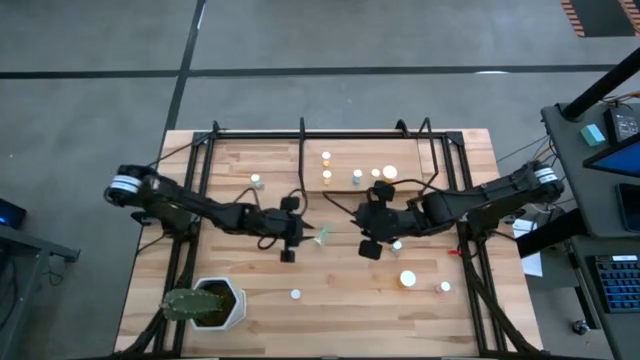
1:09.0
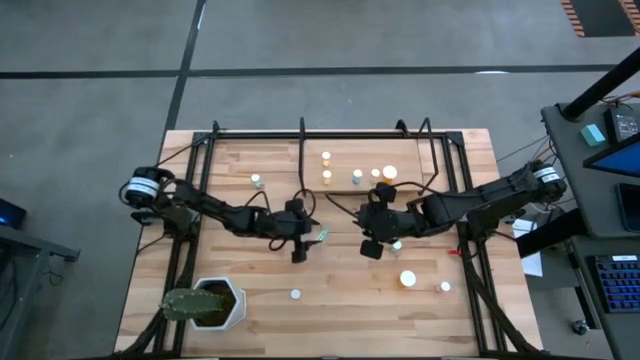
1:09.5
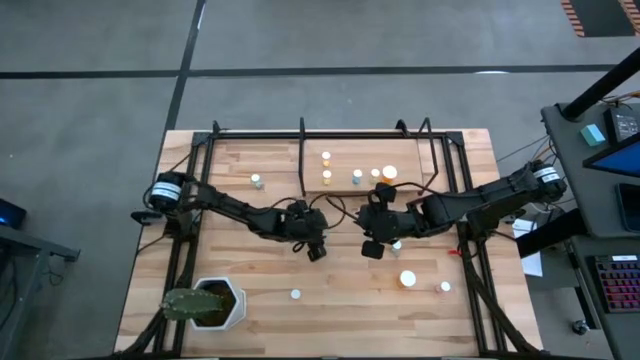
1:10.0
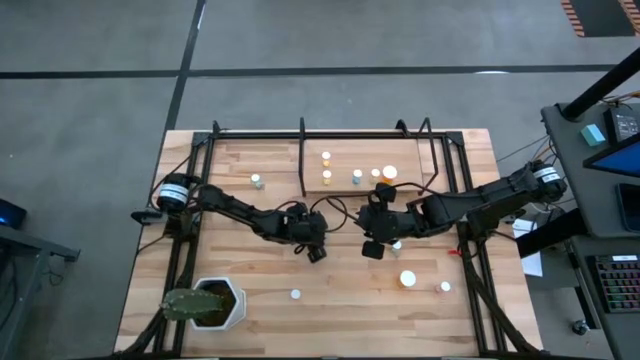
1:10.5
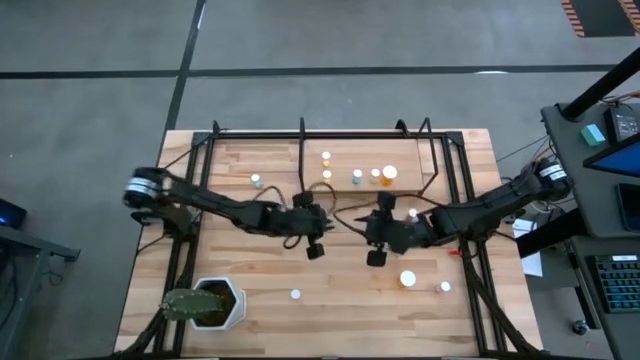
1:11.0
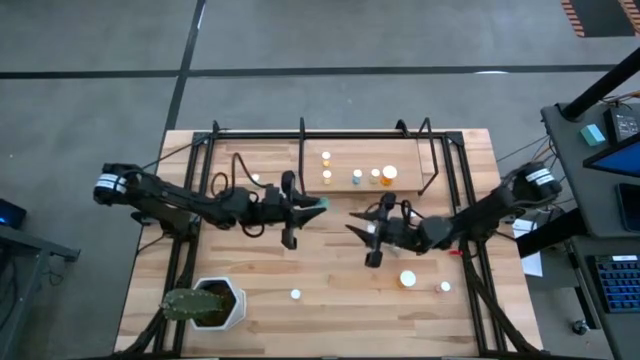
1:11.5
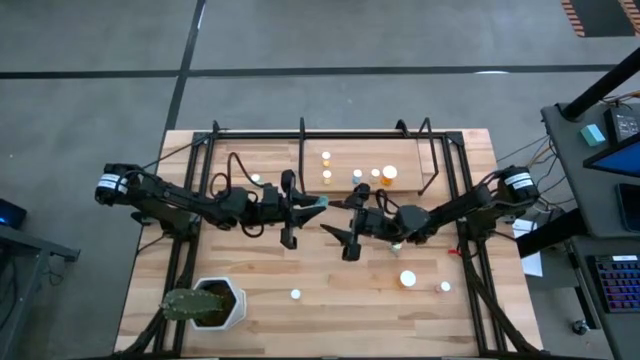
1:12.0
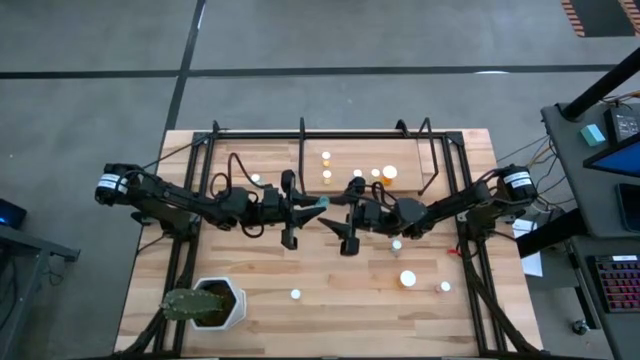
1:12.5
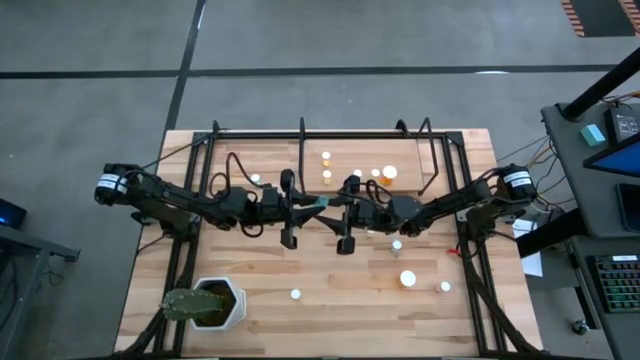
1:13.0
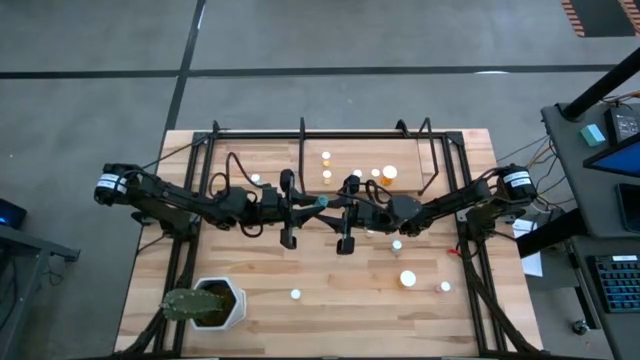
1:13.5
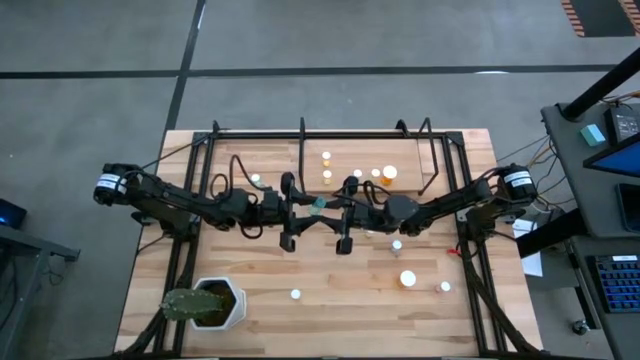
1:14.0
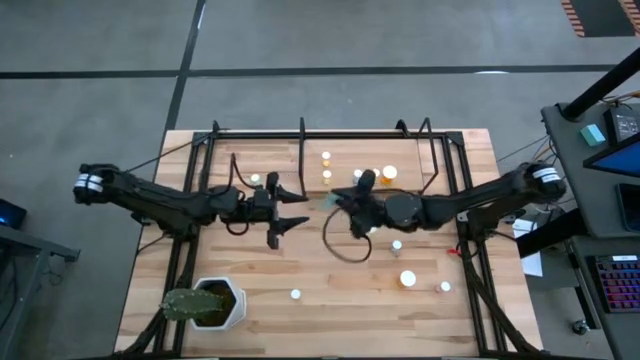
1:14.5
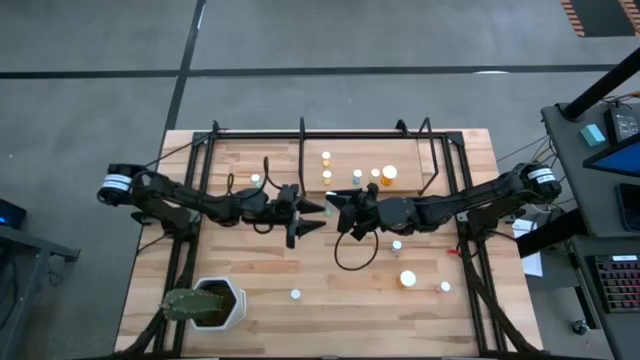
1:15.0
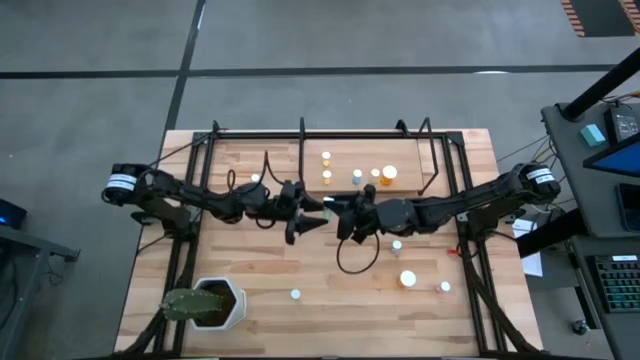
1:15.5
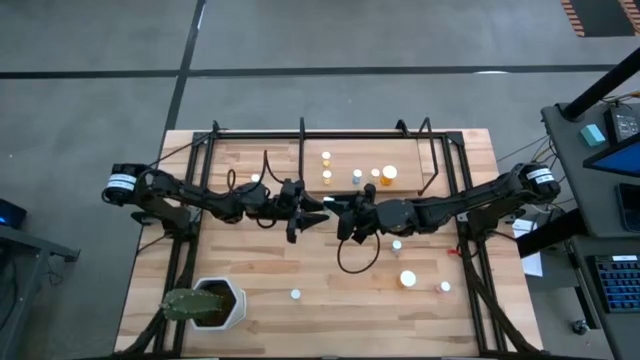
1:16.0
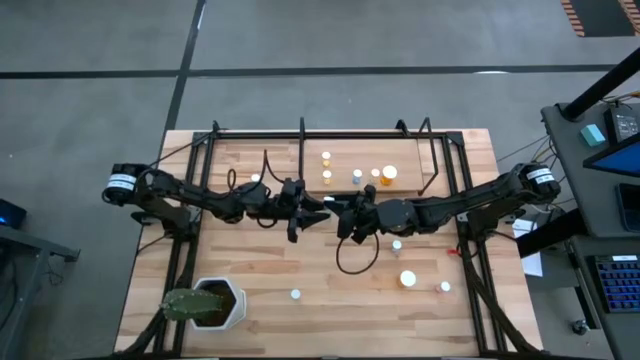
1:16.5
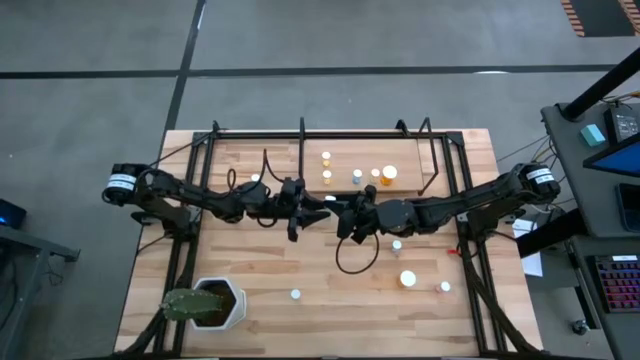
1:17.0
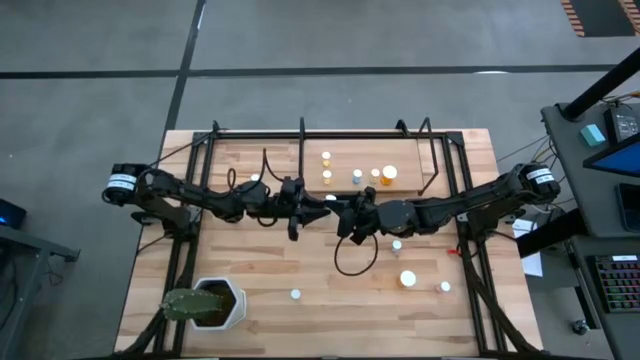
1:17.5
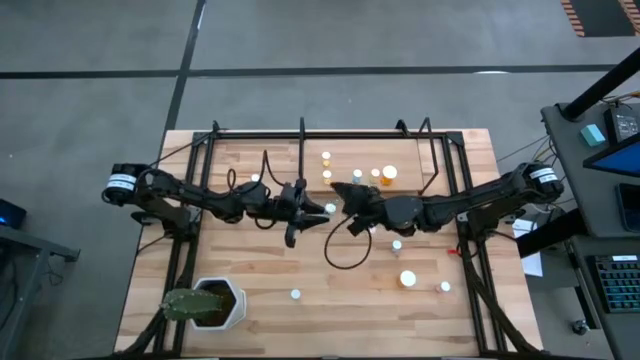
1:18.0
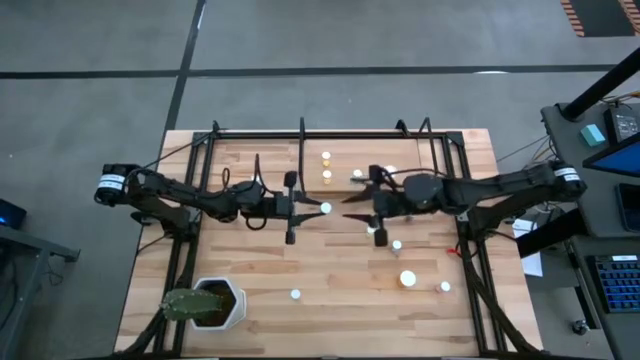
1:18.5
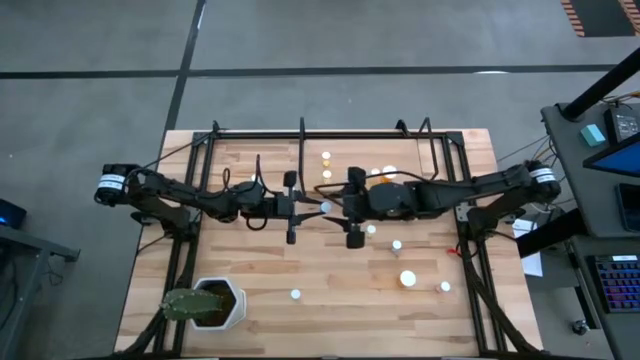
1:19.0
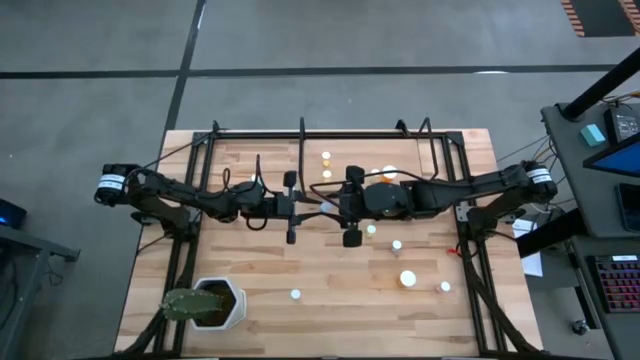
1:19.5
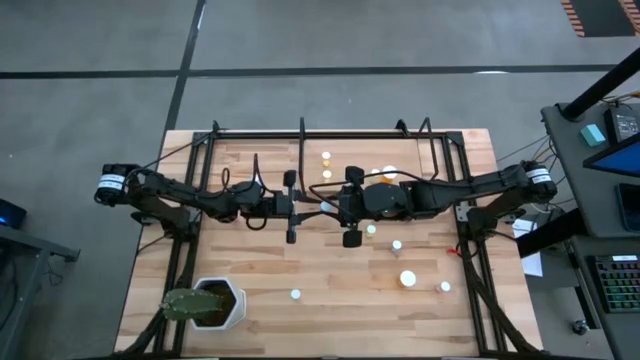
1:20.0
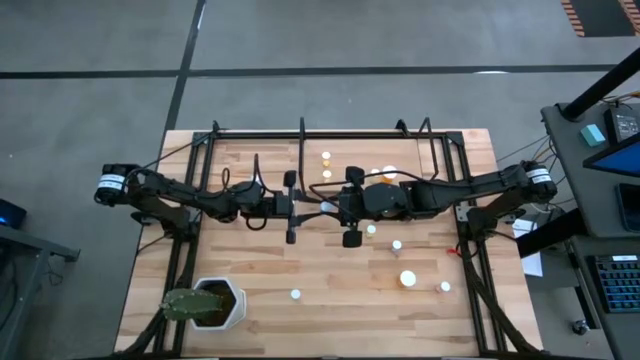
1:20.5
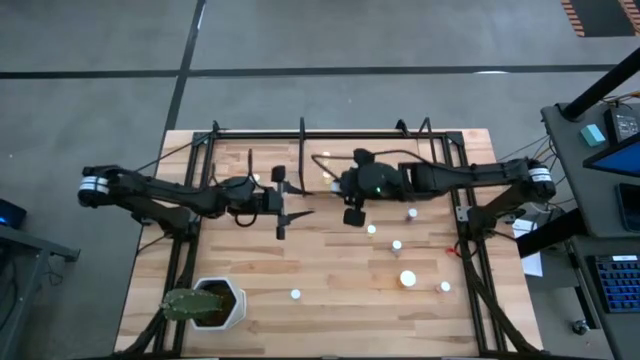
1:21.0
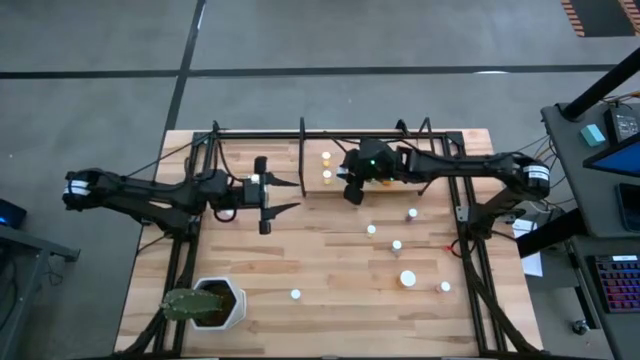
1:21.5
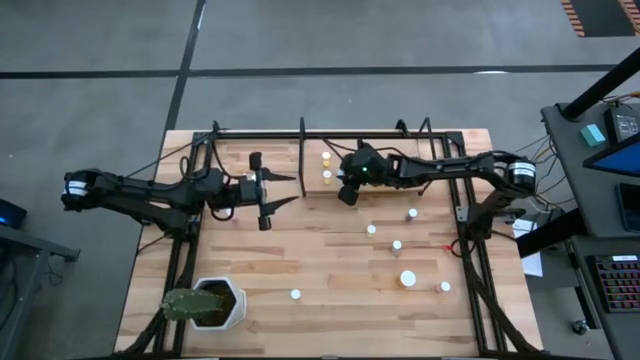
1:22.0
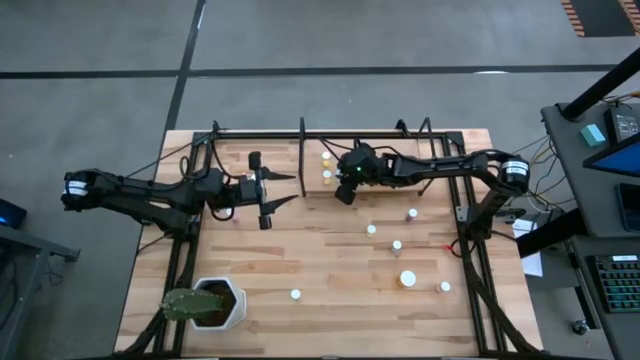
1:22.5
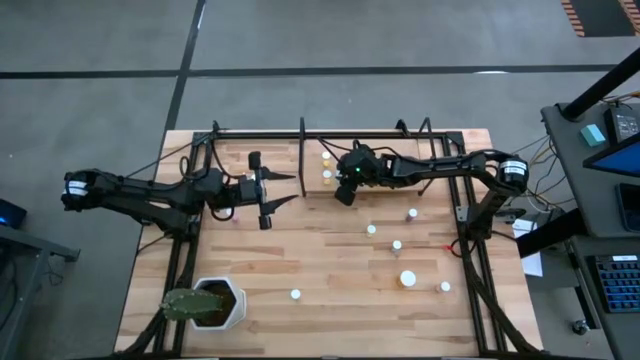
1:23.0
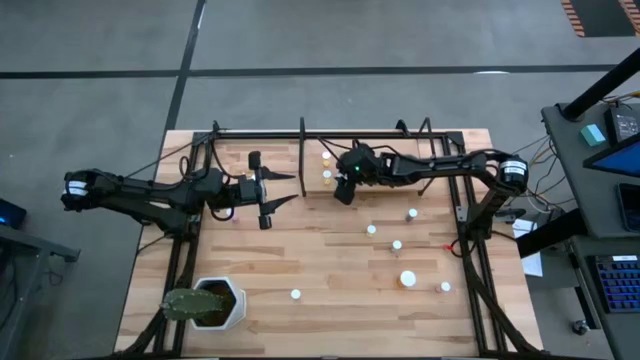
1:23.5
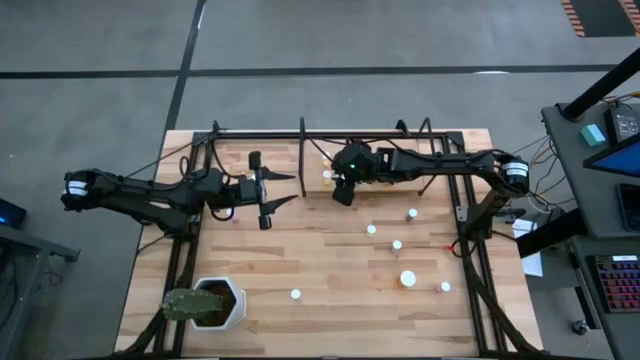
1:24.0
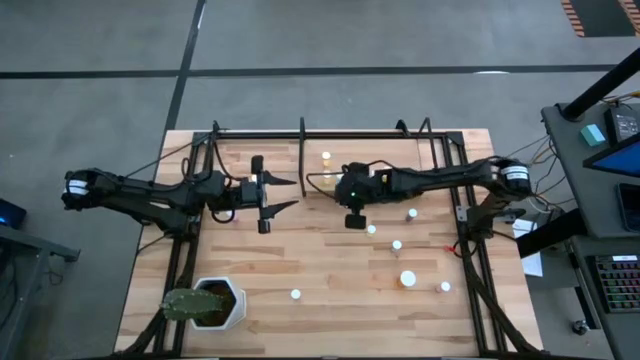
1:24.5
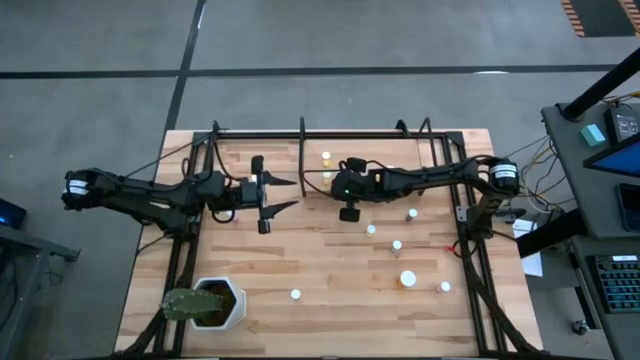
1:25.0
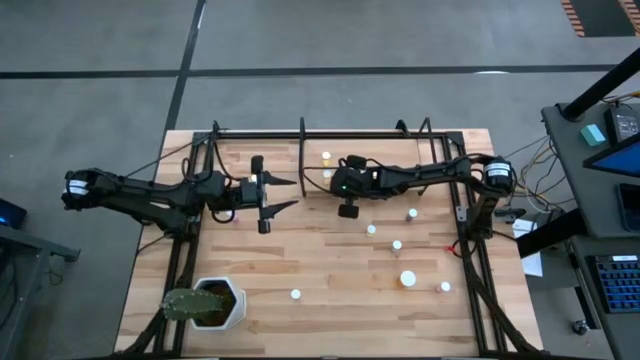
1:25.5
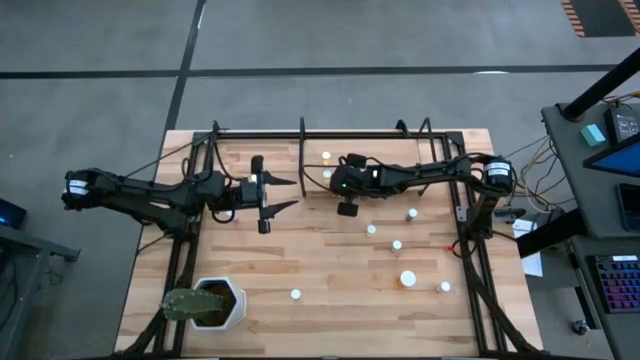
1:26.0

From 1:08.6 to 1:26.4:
Task: Pick and place medicine bottles onto shelf by color
Put the green pill bottle on the shelf

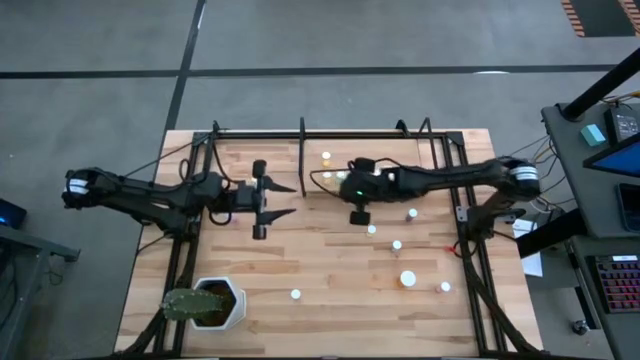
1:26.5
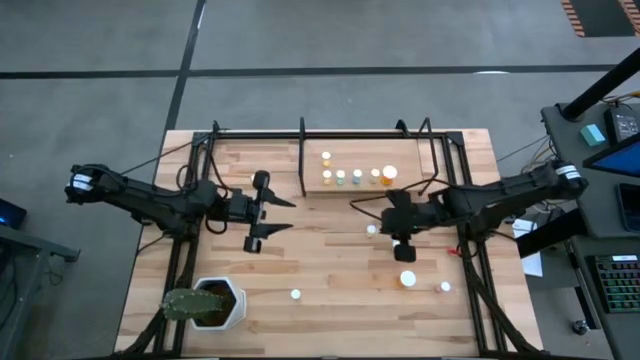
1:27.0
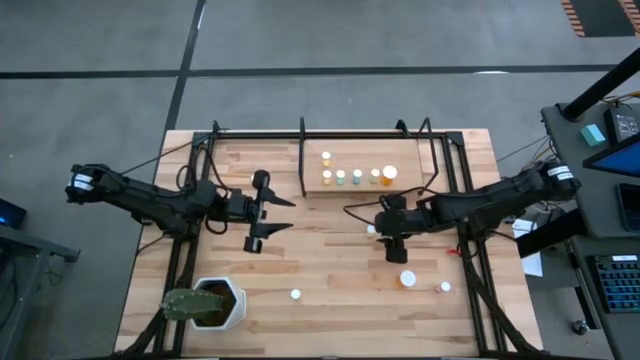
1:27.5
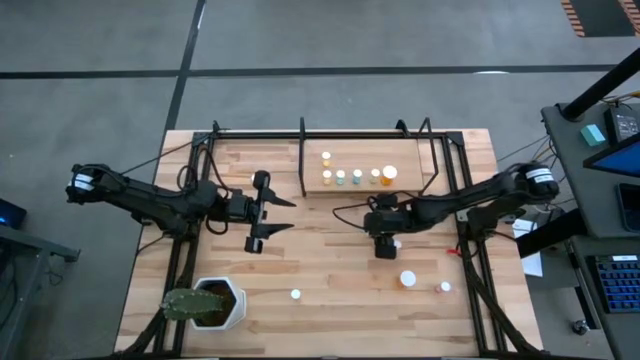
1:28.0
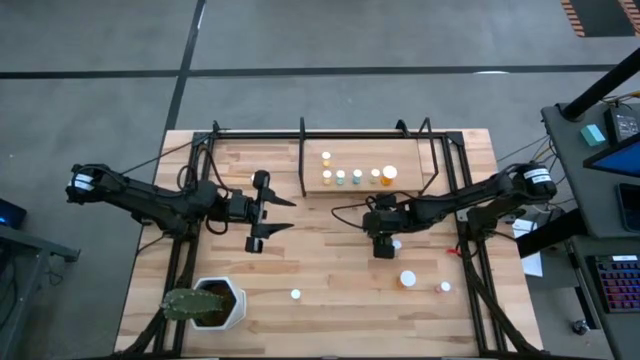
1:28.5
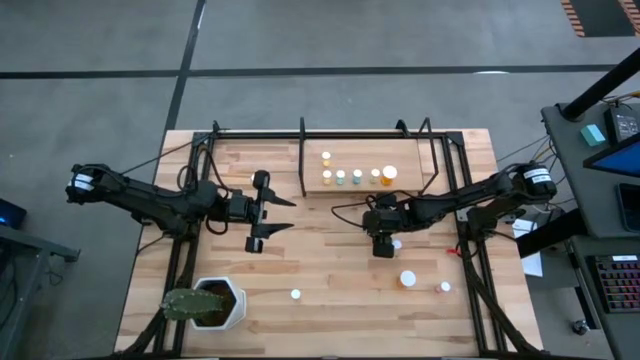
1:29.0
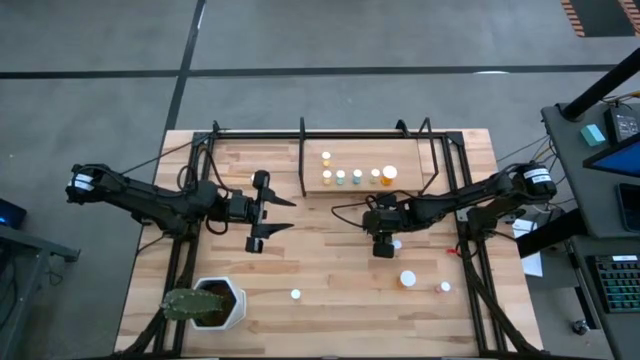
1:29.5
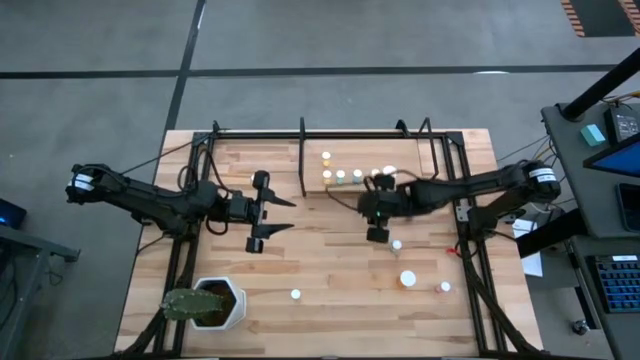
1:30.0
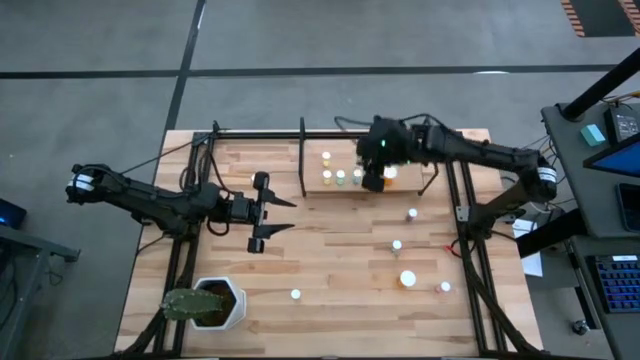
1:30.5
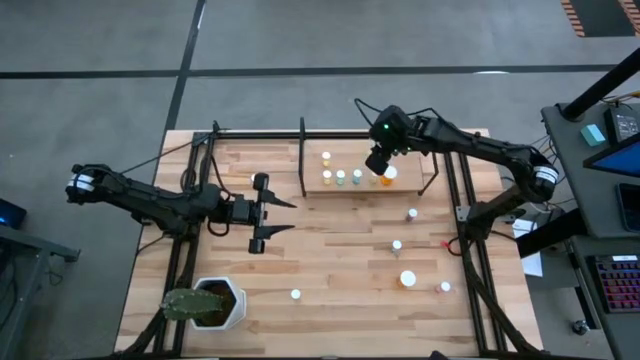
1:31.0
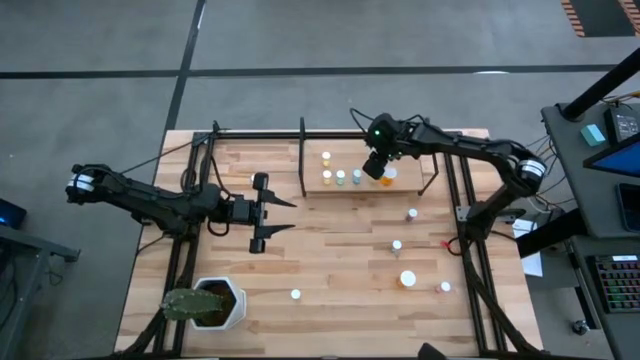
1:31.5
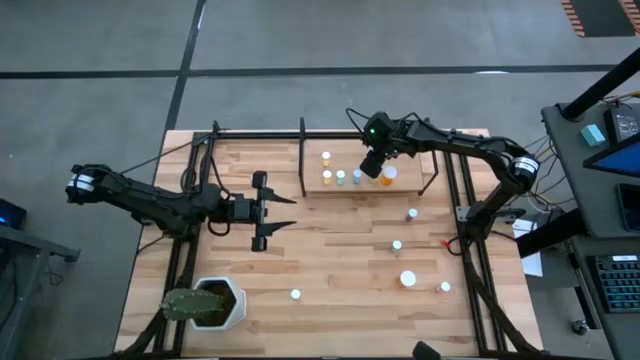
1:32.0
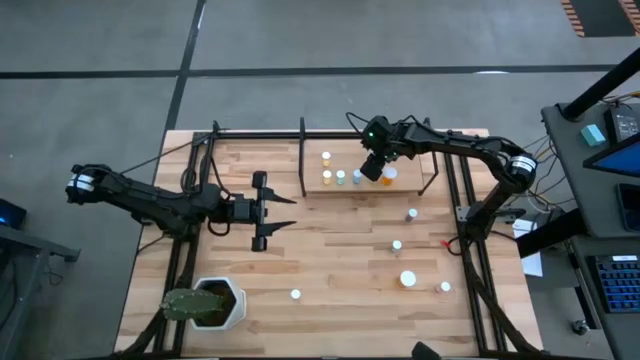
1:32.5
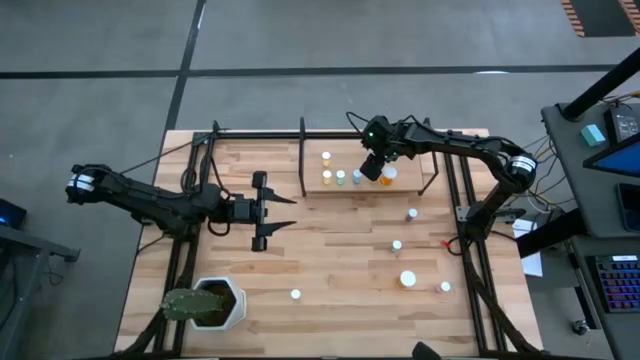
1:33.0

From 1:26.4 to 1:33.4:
Put the yellow pill bottle on the shelf aligned with the other yellow pill bottle
